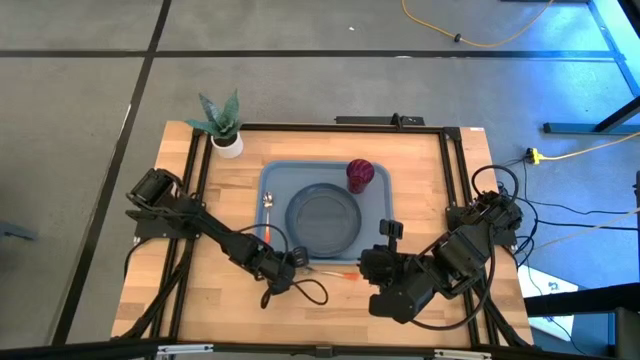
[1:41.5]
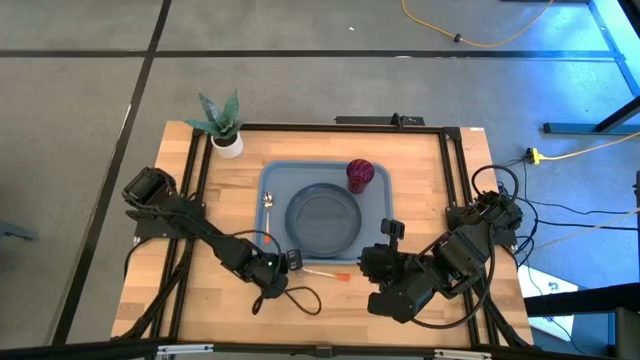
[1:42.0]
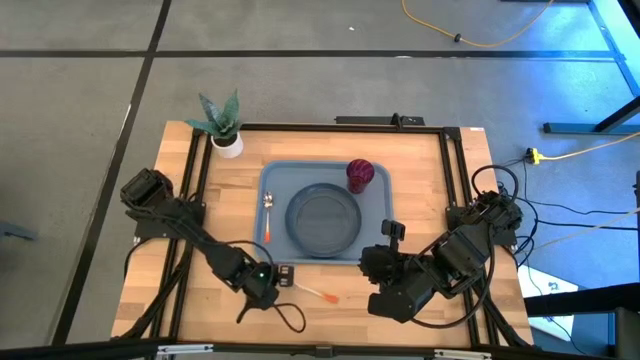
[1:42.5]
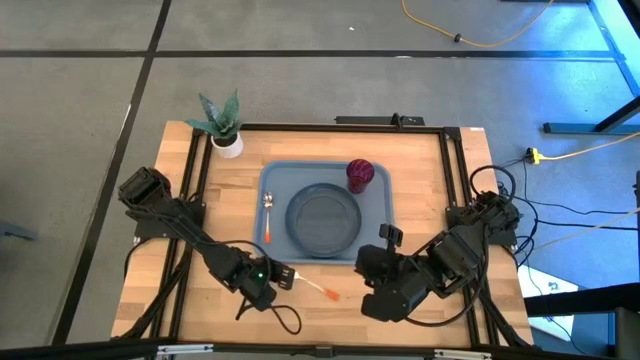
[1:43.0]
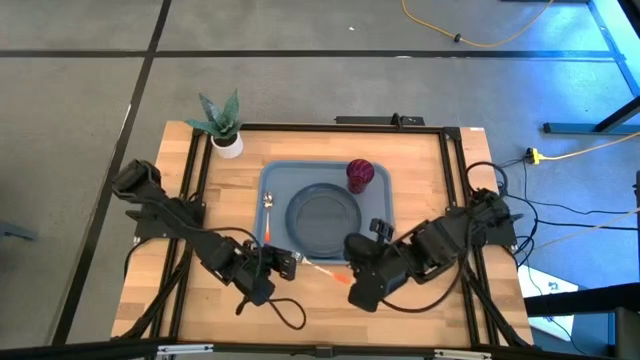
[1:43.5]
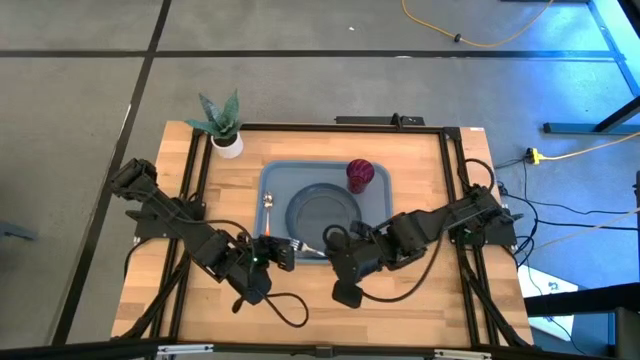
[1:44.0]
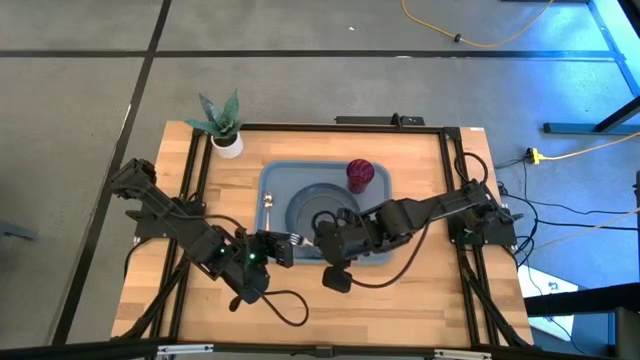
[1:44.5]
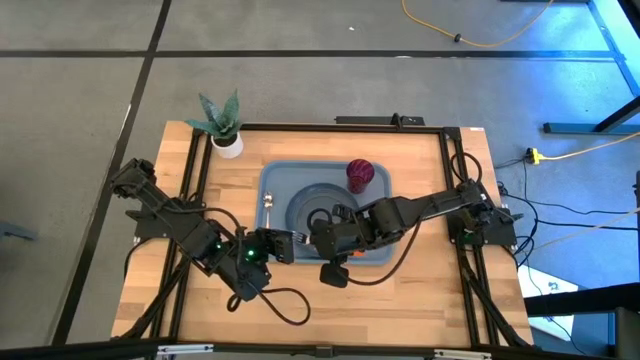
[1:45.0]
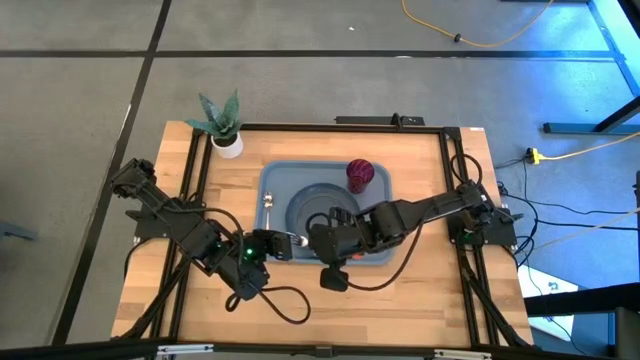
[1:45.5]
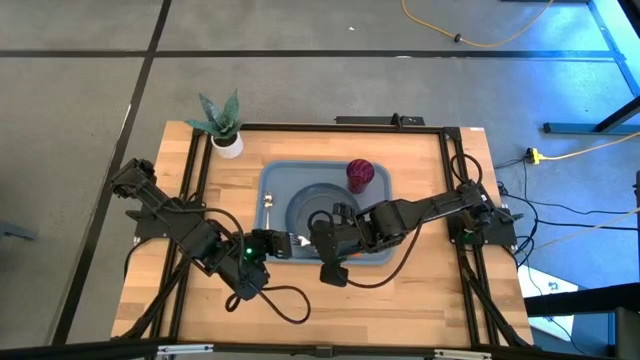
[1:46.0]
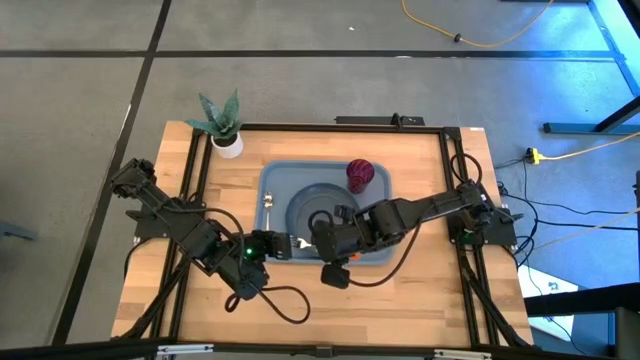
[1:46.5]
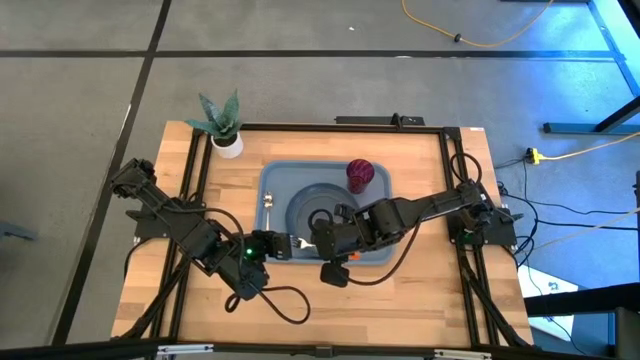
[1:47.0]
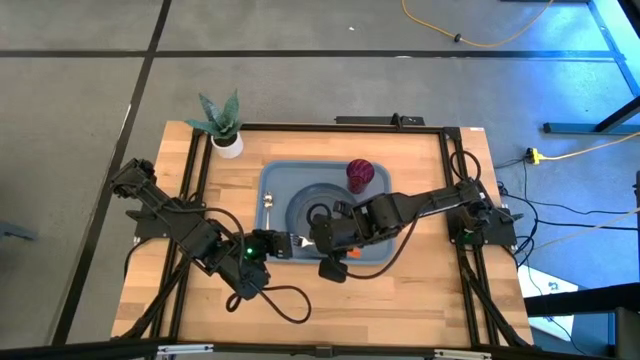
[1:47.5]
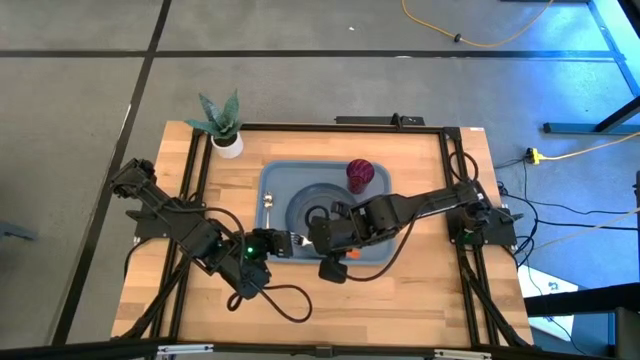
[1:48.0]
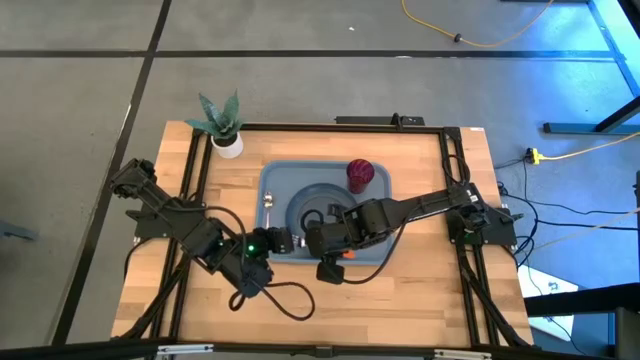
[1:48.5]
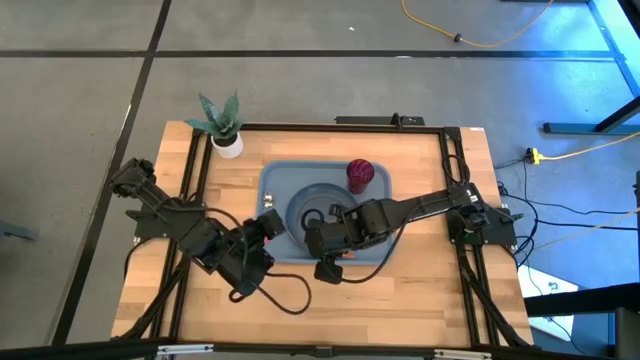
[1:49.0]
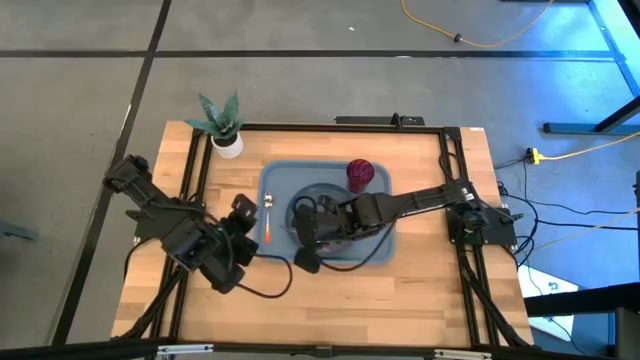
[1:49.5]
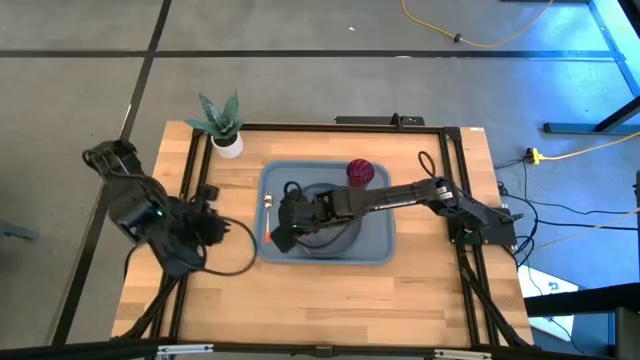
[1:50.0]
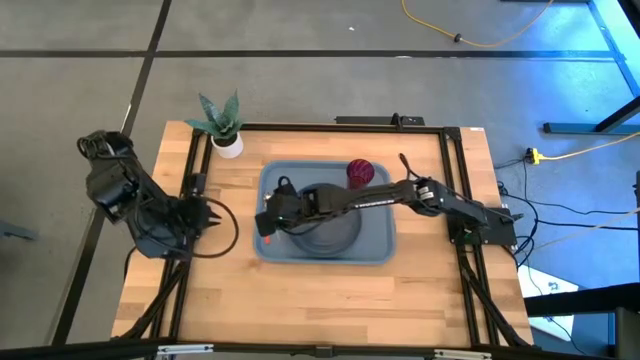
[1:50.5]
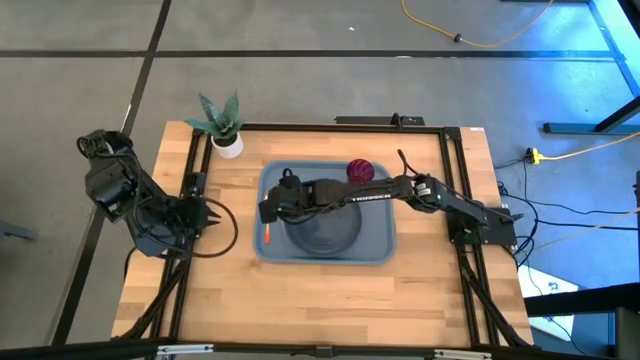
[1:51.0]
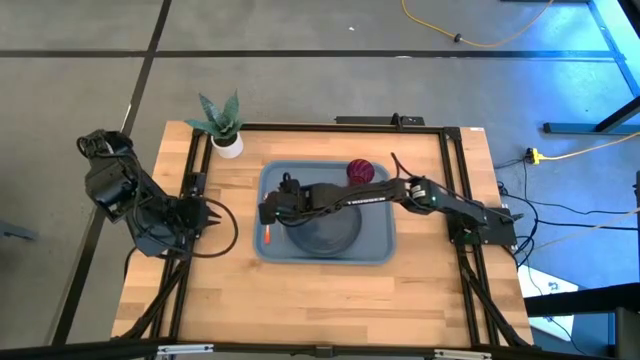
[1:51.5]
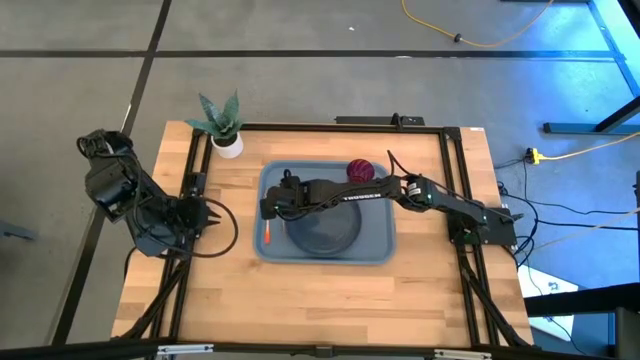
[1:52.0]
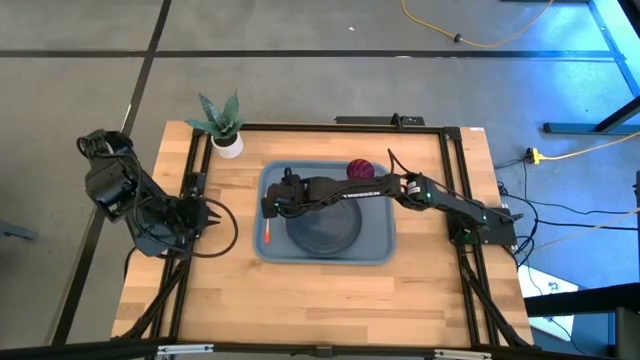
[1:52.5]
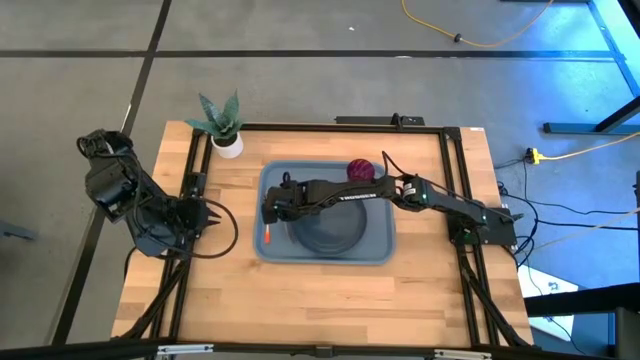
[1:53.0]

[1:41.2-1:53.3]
Task: Pick and place plate/cup/fork/spoon on tray
Put the orange fork on the blue tray

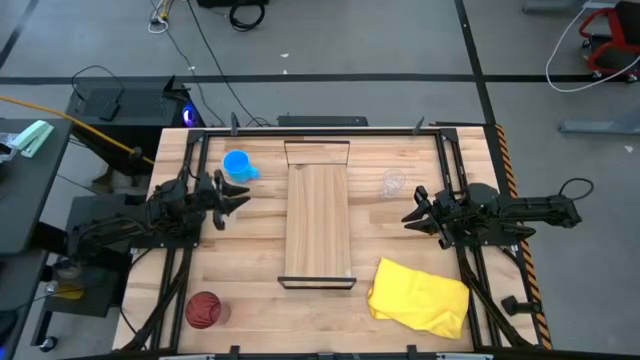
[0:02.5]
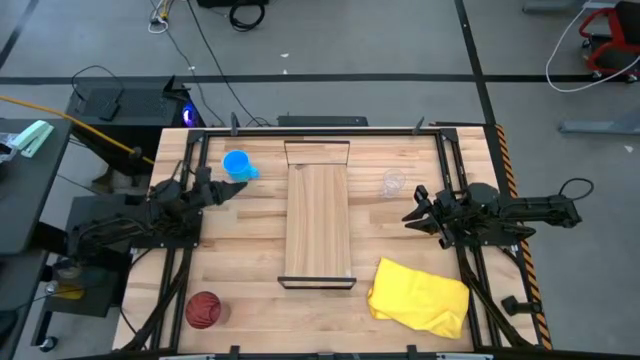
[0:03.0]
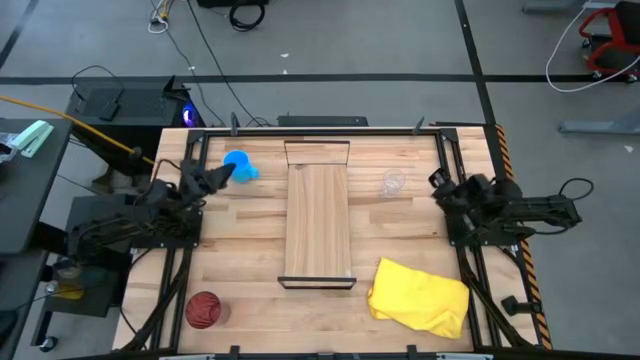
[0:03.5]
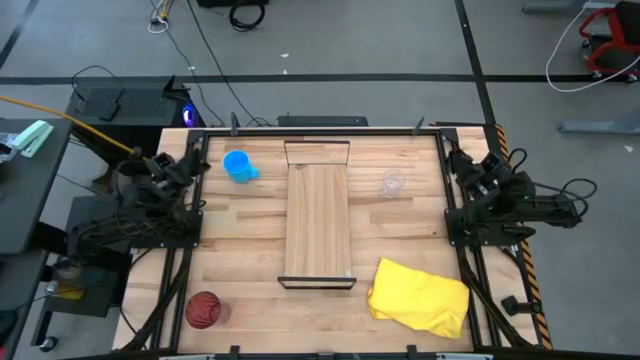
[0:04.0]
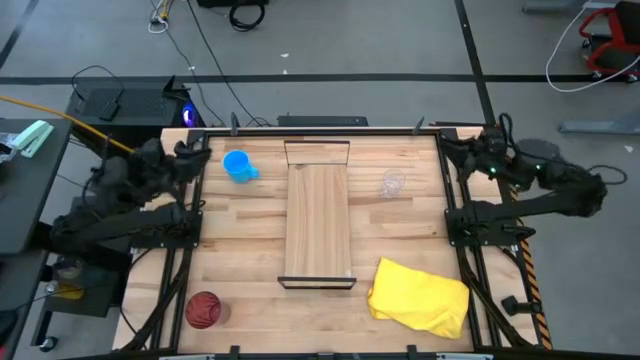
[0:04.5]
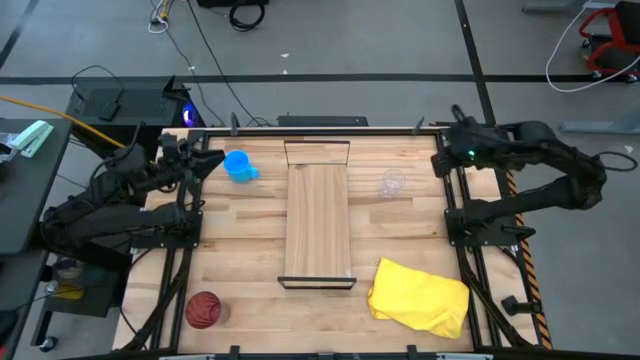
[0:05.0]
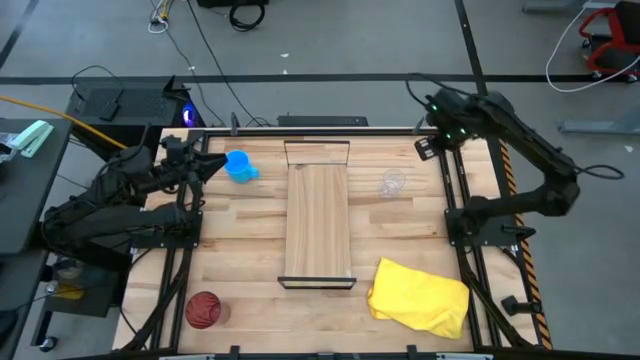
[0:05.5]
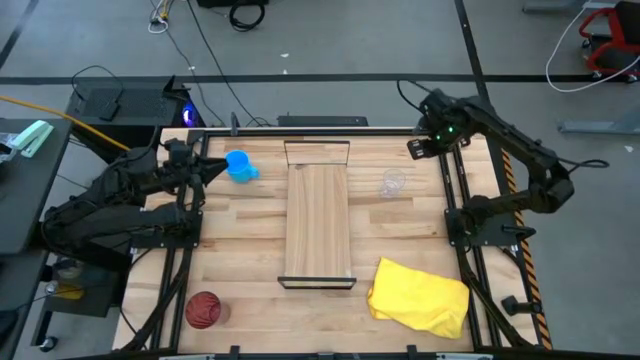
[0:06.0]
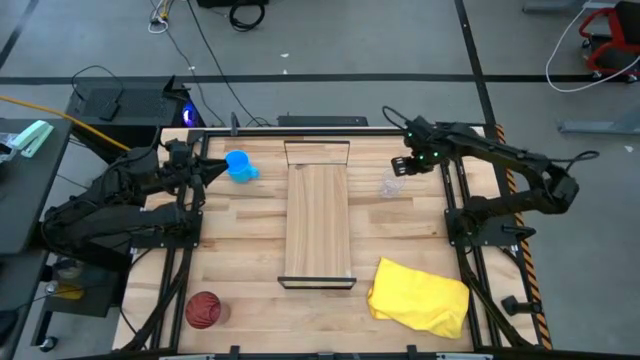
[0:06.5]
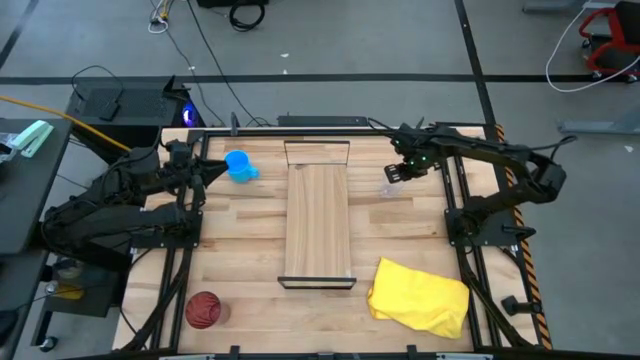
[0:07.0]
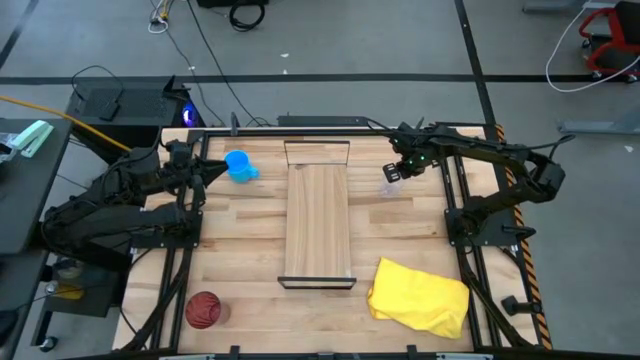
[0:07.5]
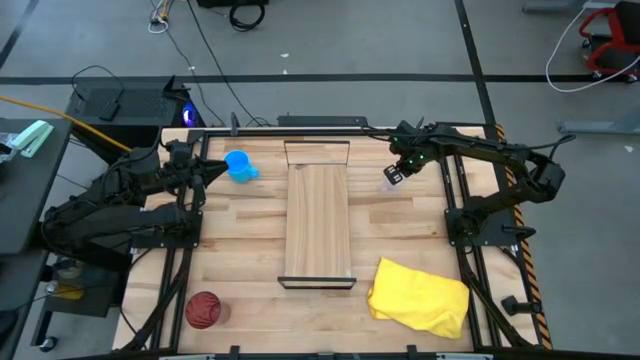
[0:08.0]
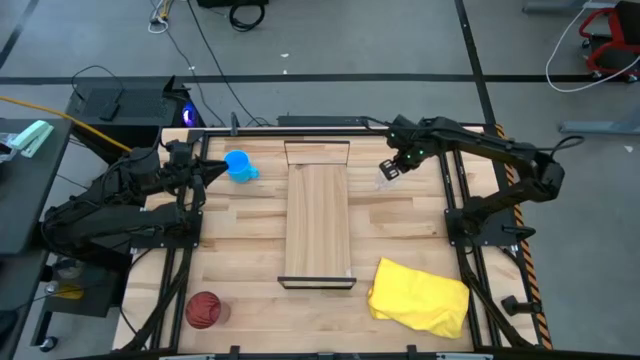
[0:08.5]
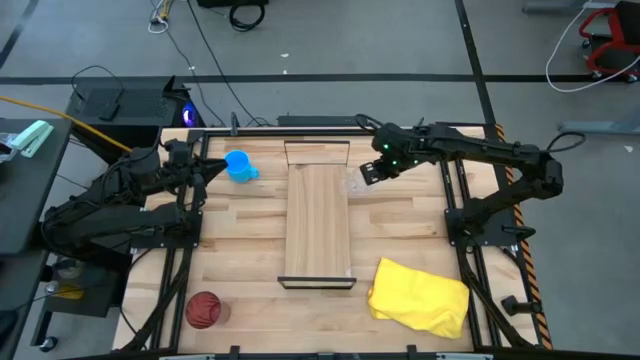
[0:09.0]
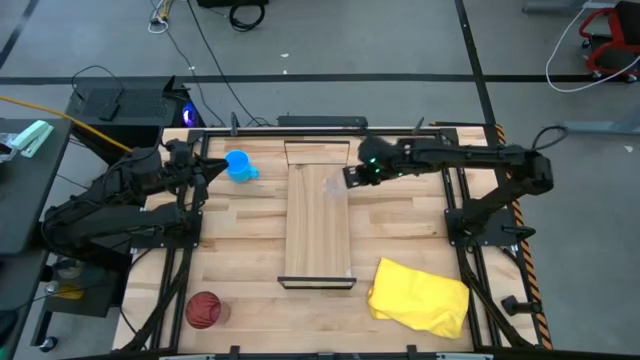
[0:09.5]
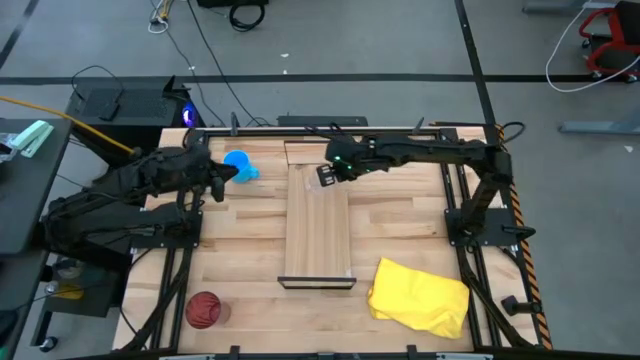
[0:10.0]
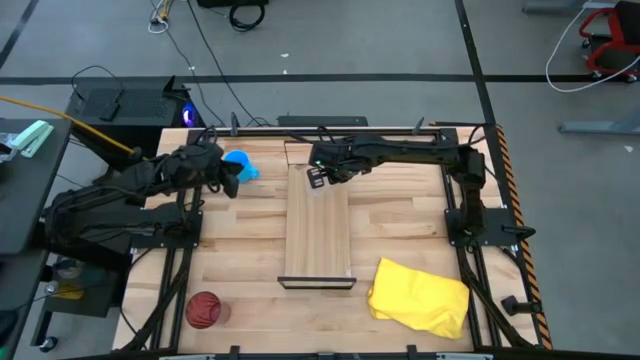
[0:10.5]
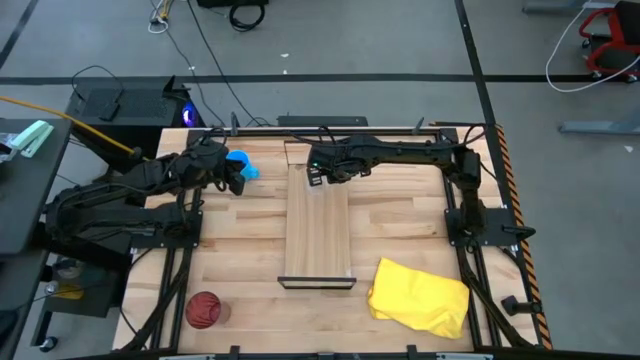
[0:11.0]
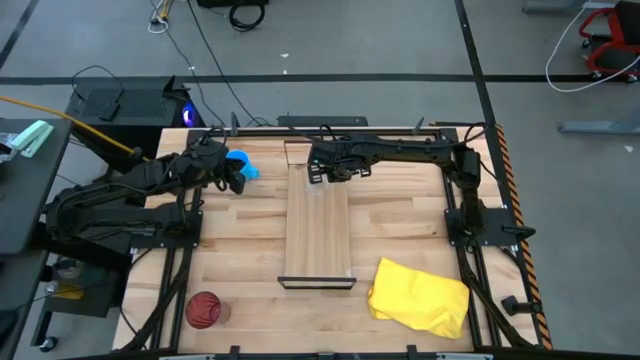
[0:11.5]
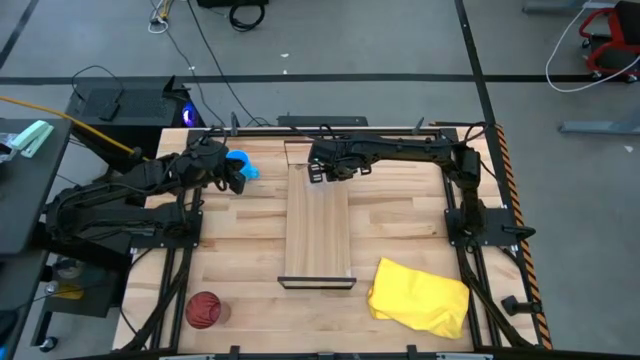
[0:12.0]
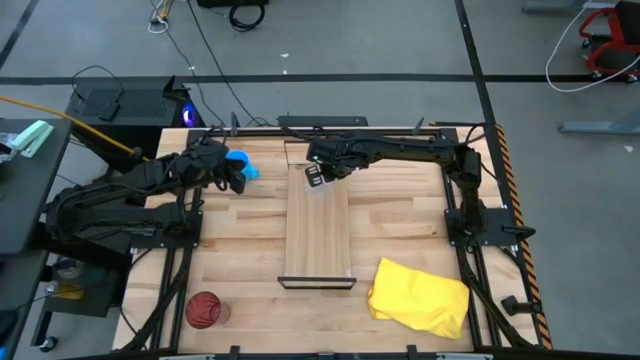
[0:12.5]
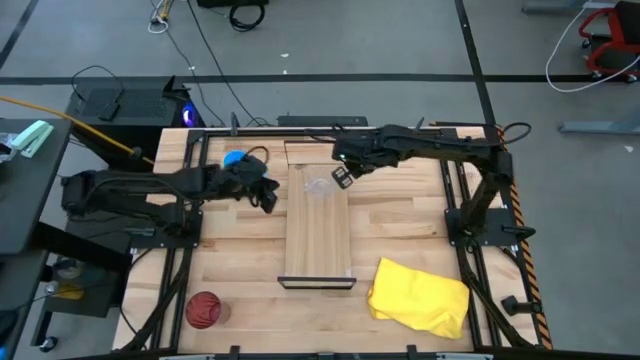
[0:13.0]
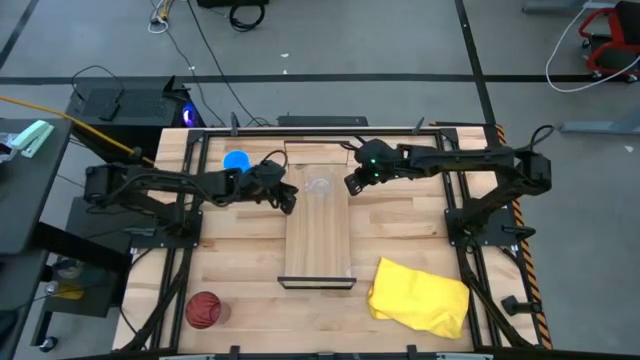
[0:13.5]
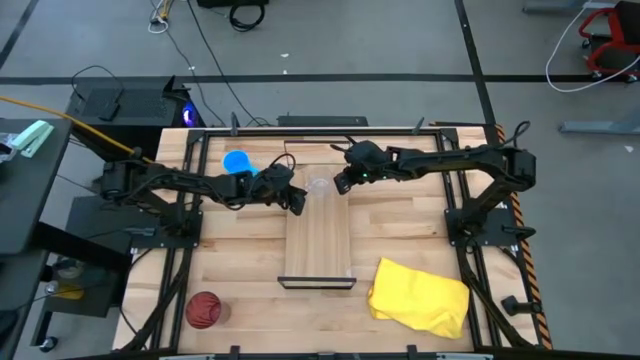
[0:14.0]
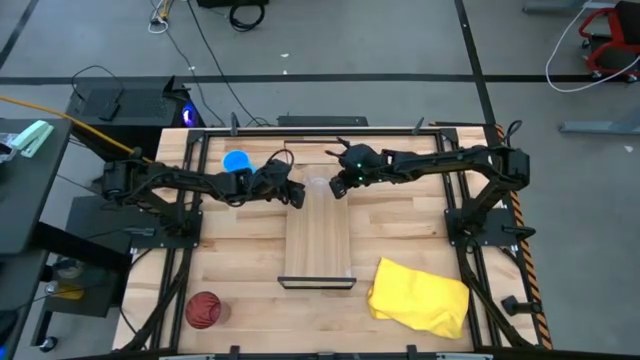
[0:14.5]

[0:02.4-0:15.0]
Task: Stack small to large cups/mugs on shelf
Put the transparent mug on the shelf
